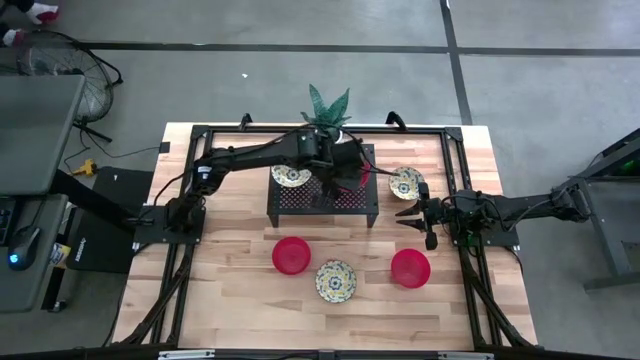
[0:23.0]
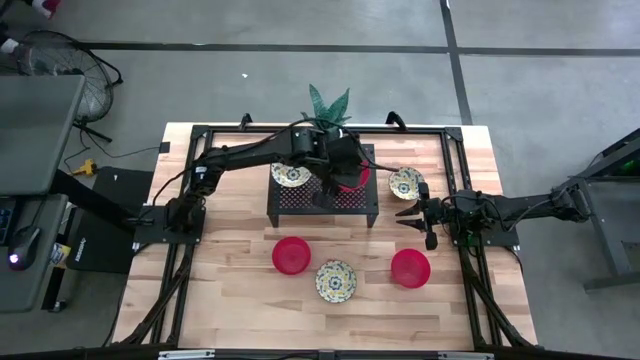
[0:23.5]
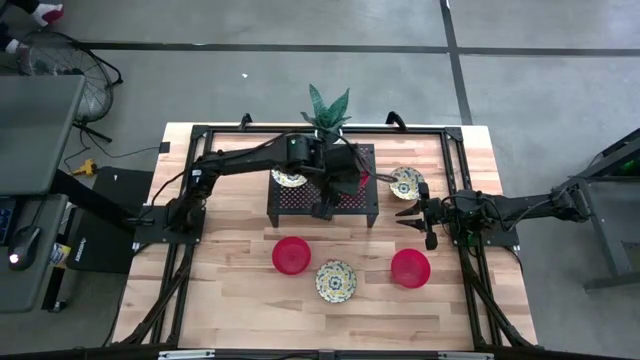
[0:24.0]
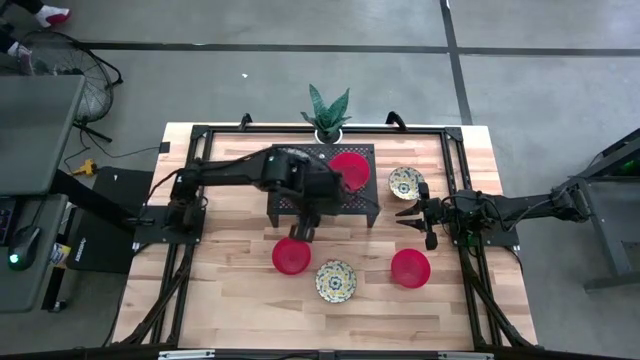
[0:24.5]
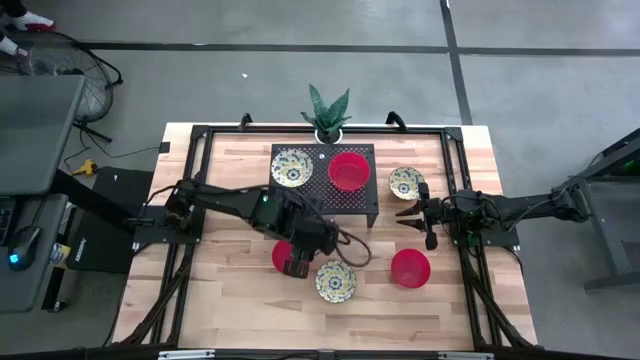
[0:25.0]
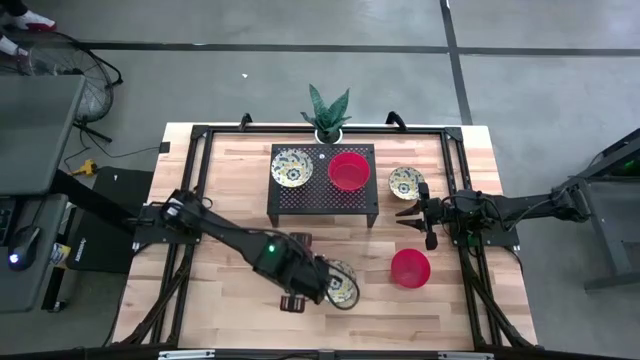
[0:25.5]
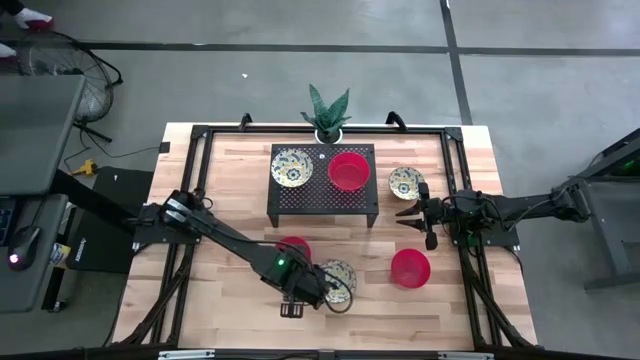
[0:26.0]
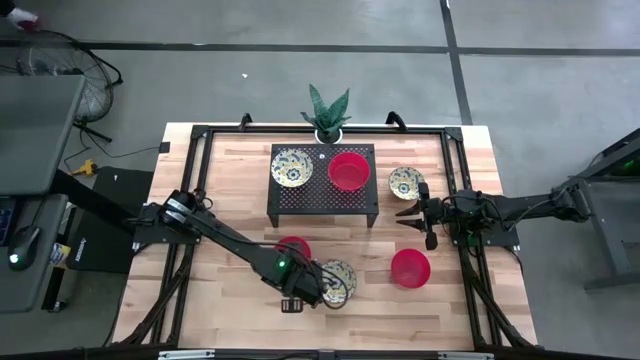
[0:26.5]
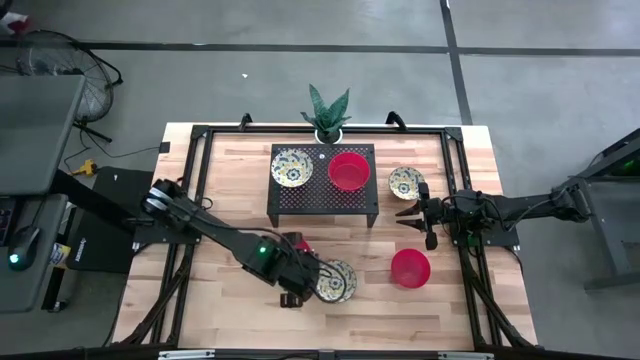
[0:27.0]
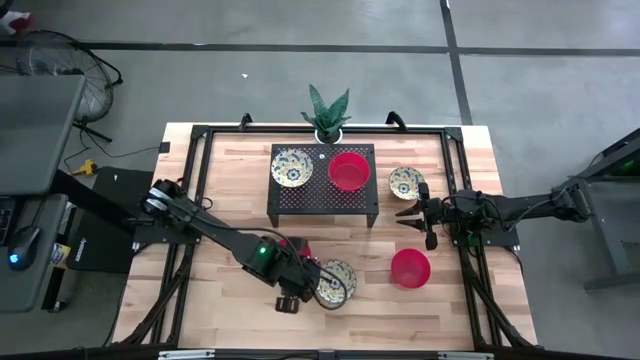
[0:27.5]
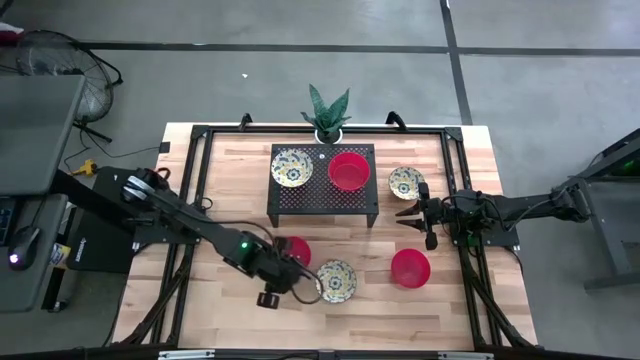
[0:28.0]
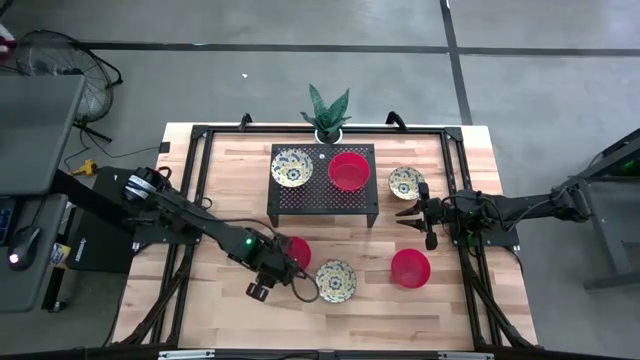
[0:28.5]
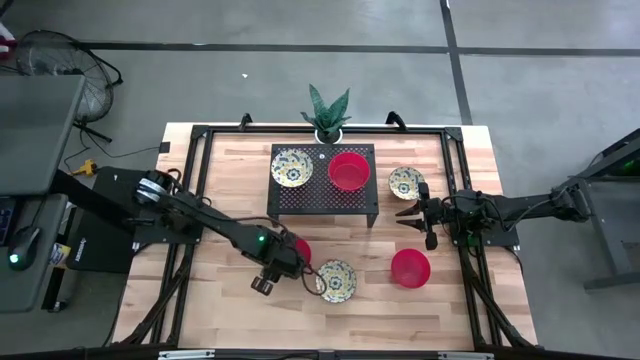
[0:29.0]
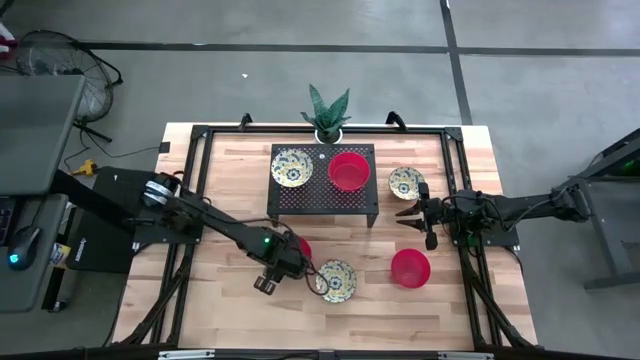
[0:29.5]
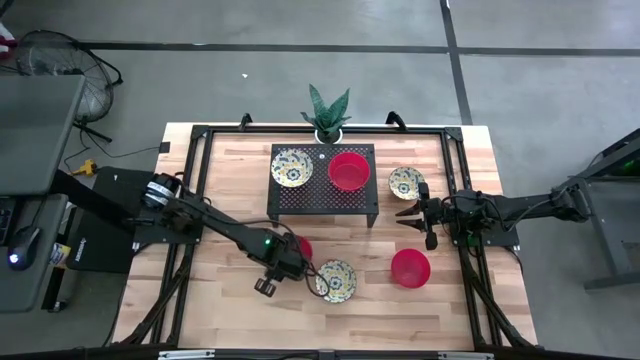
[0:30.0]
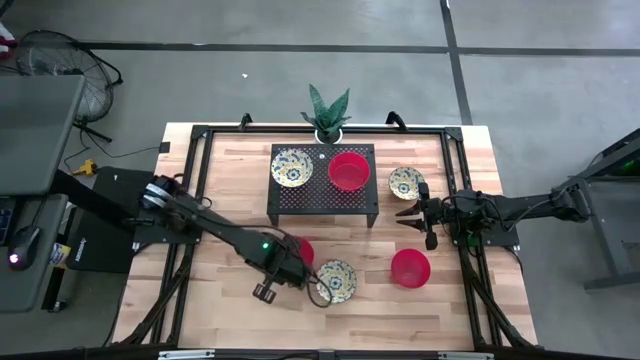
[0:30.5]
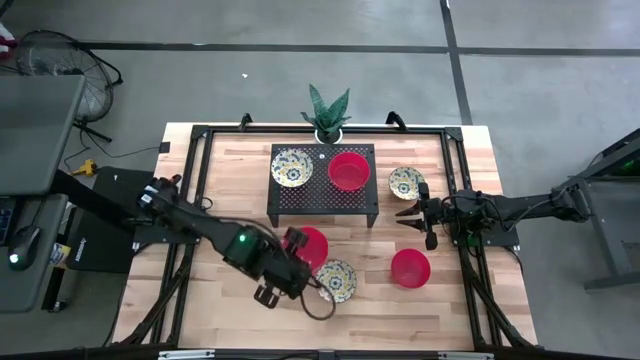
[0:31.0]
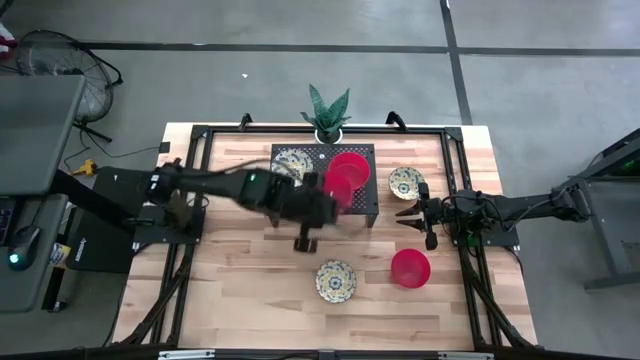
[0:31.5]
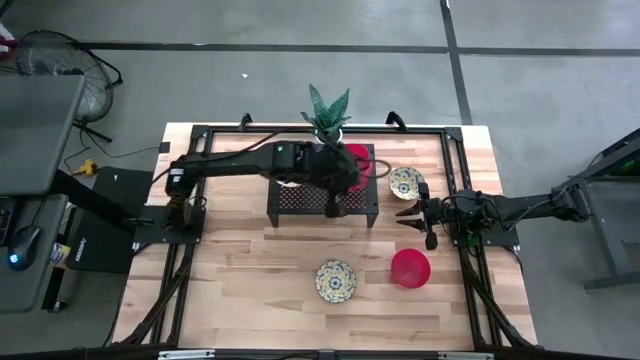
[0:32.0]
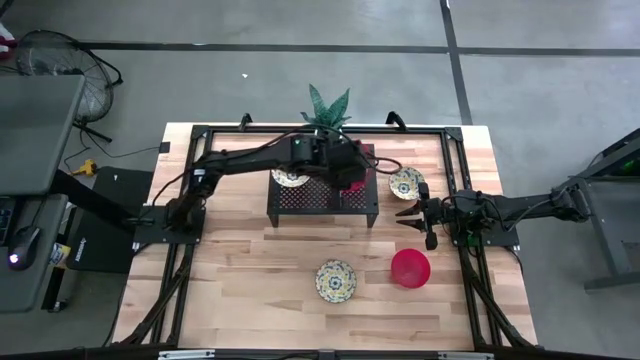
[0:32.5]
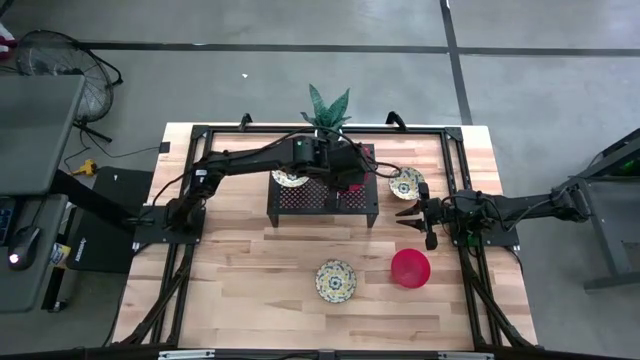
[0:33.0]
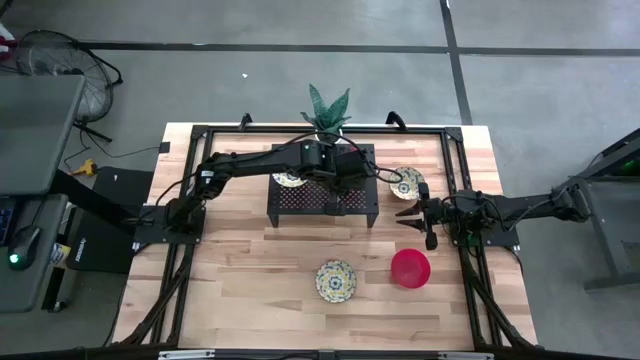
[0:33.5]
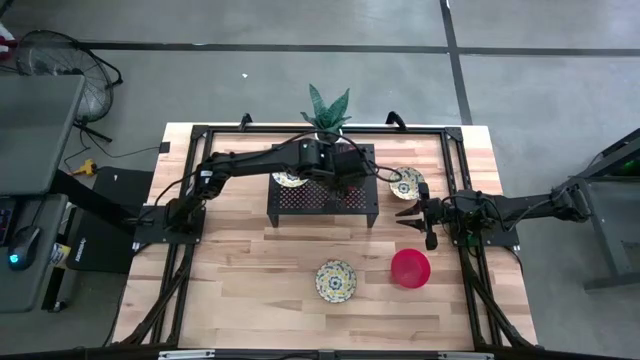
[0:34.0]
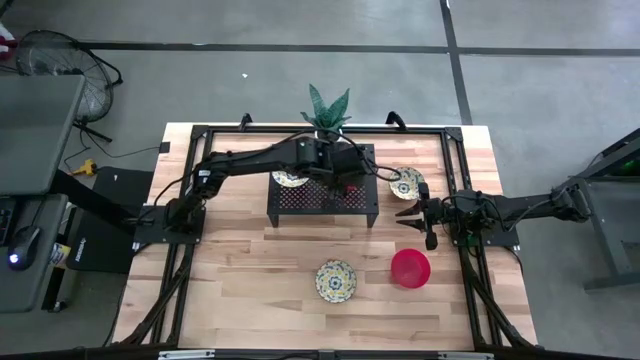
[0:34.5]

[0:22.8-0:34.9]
Task: Pick & Place Mini bowls
Stack the left red bowl on the red bowl on the shelf

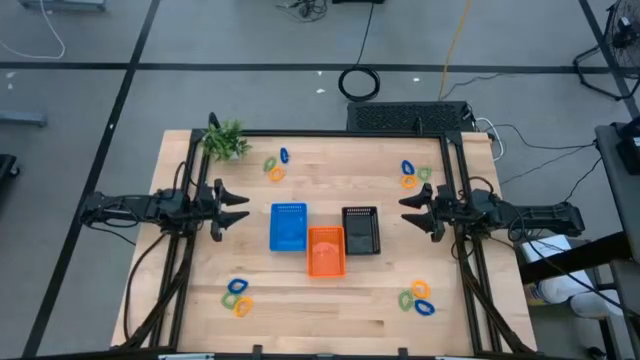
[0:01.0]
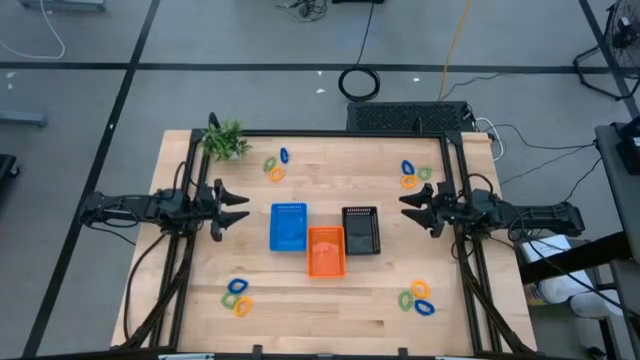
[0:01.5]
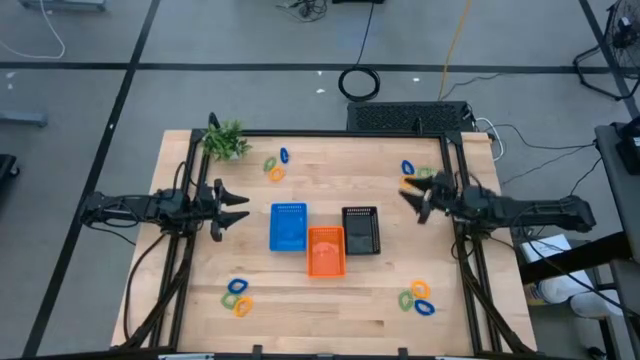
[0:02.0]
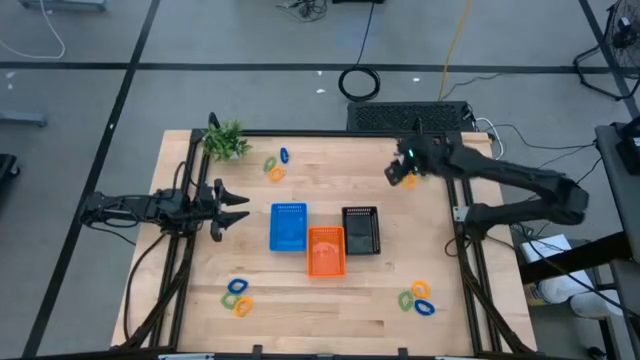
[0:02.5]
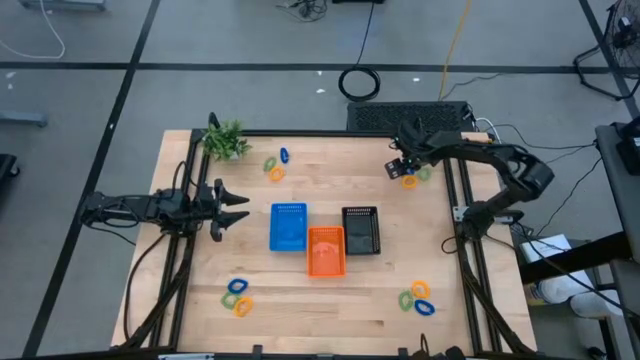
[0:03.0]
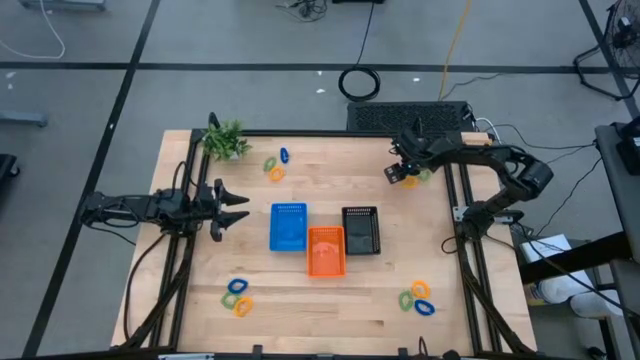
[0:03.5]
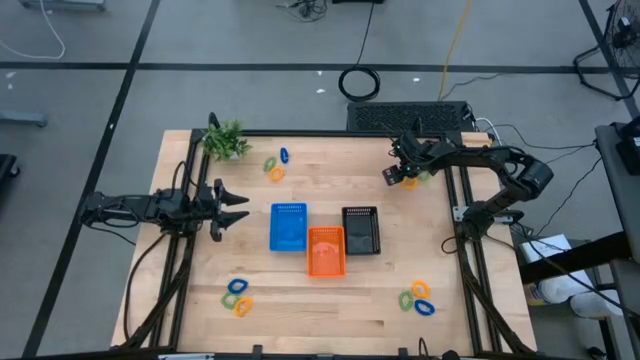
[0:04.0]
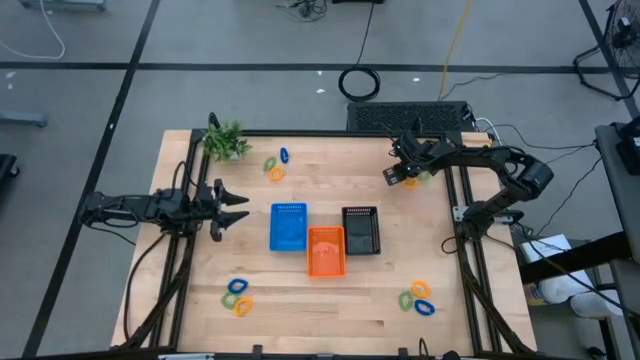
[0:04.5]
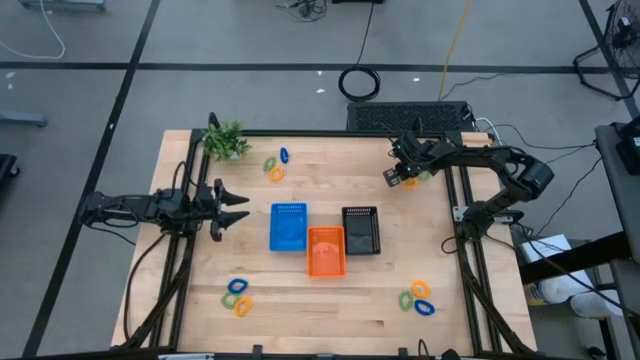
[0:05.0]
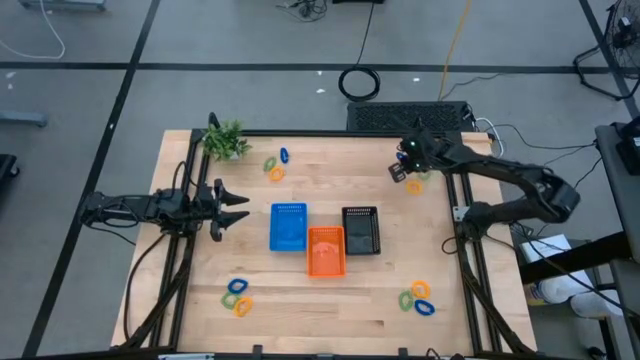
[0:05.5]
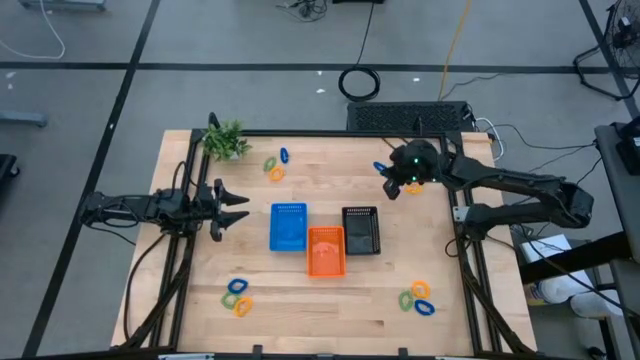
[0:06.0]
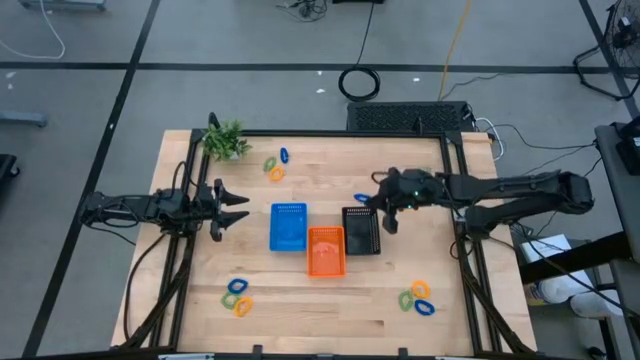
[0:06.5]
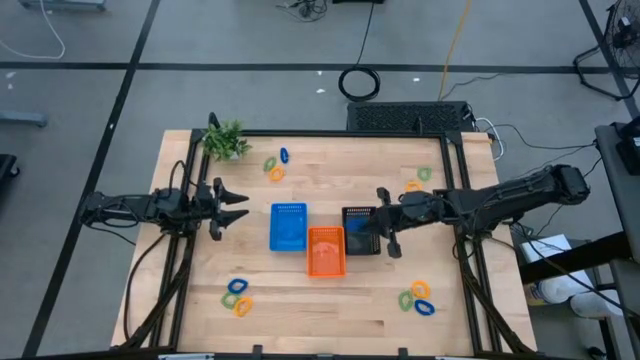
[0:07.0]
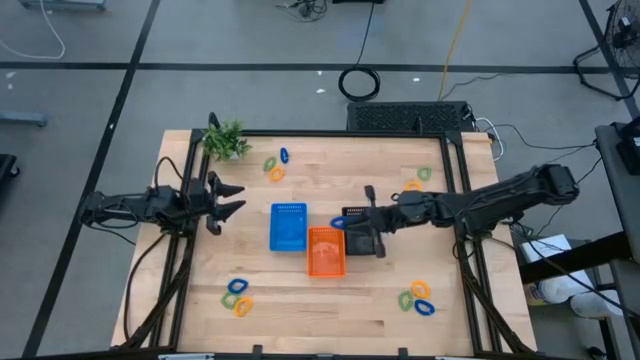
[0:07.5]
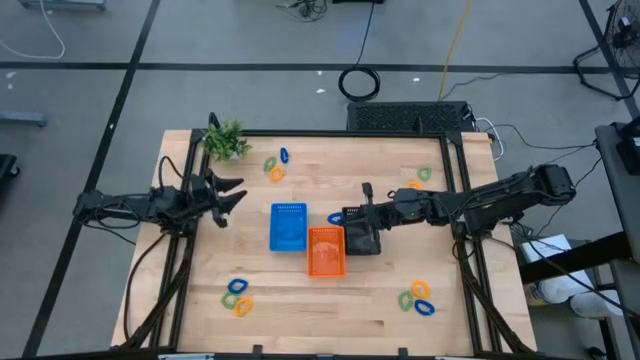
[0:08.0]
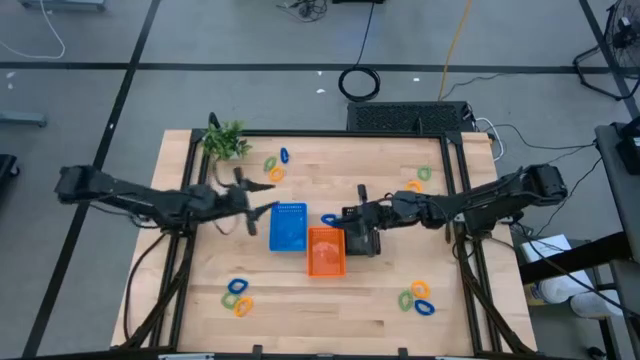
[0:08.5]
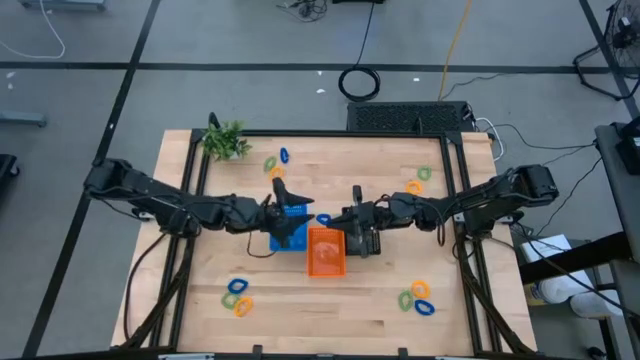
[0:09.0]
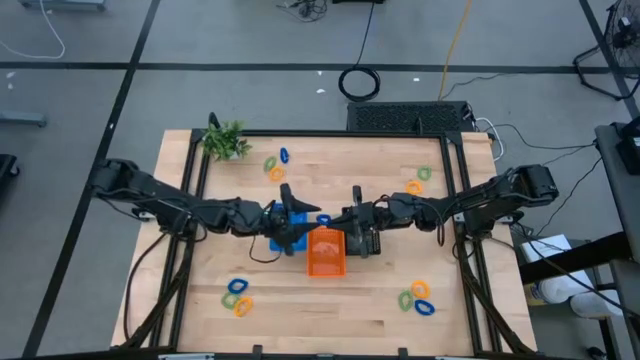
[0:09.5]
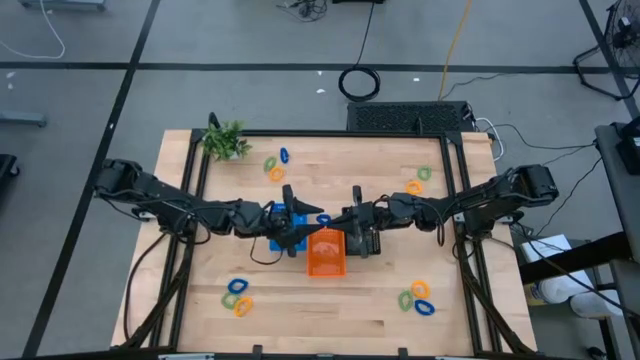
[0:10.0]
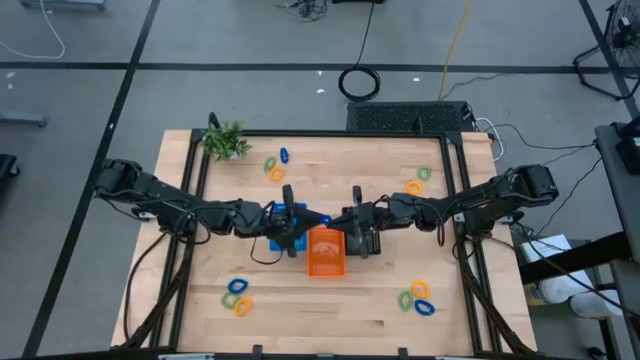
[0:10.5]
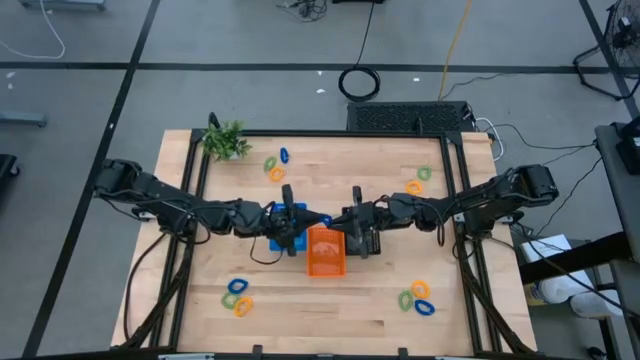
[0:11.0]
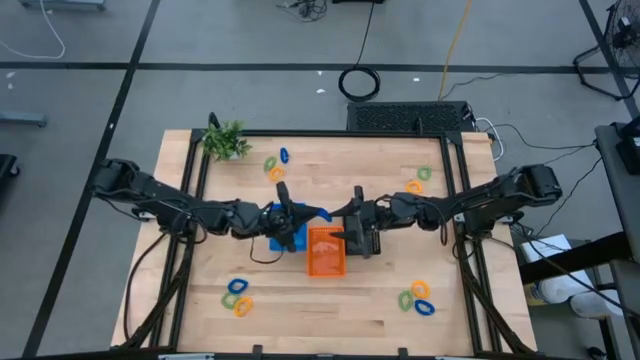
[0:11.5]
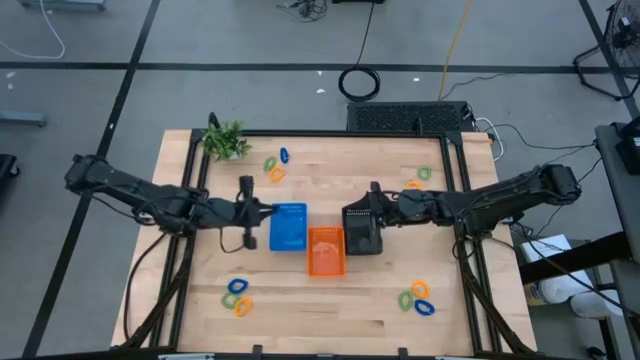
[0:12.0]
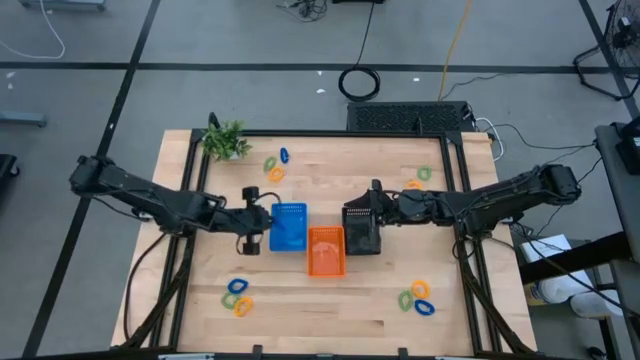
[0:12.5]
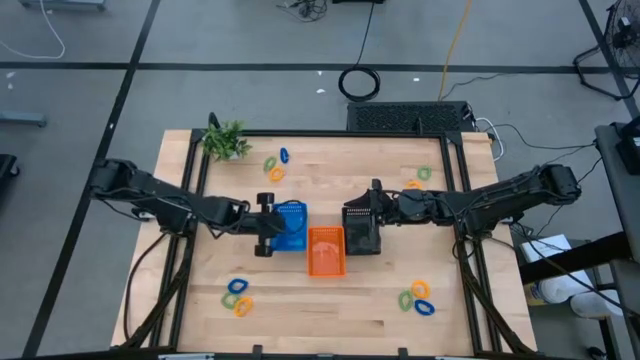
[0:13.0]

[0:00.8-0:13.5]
Task: Sort spring keychains
Put the blue spring keychain into the blue bin
